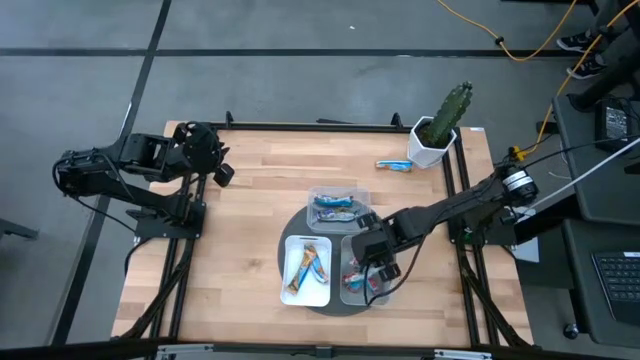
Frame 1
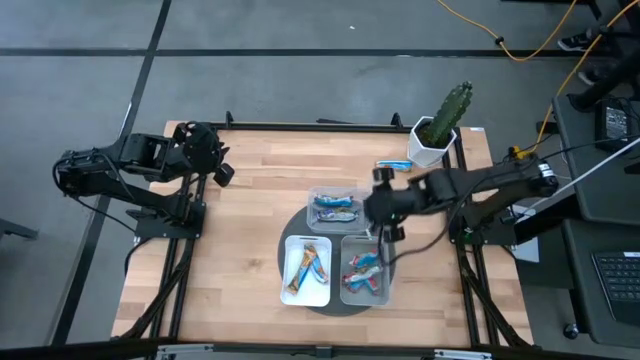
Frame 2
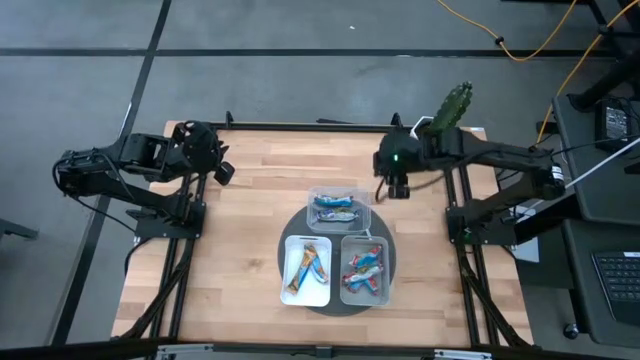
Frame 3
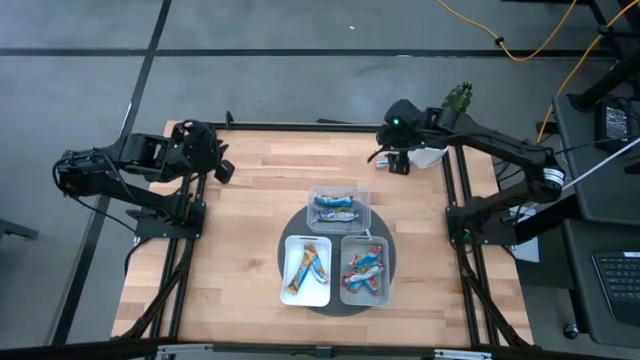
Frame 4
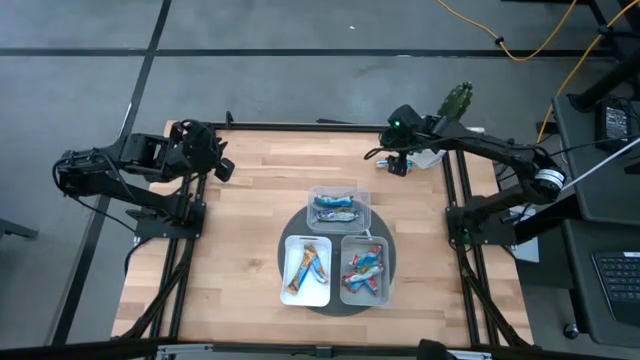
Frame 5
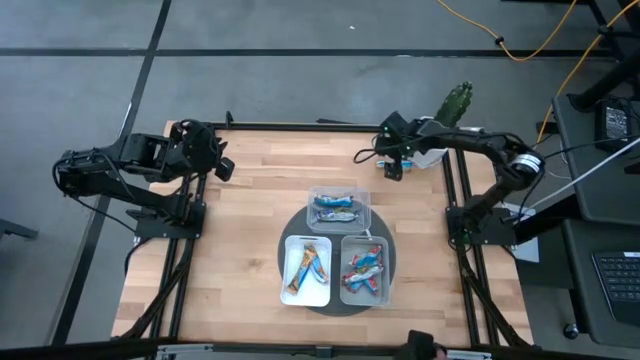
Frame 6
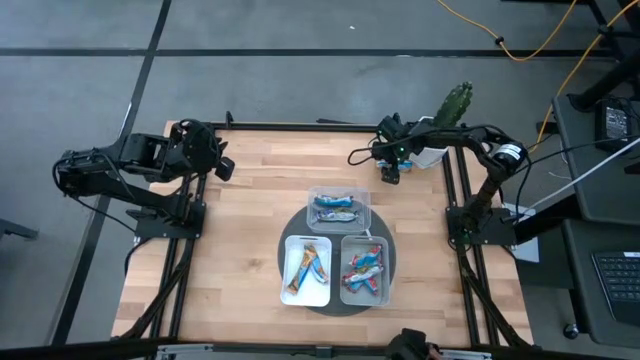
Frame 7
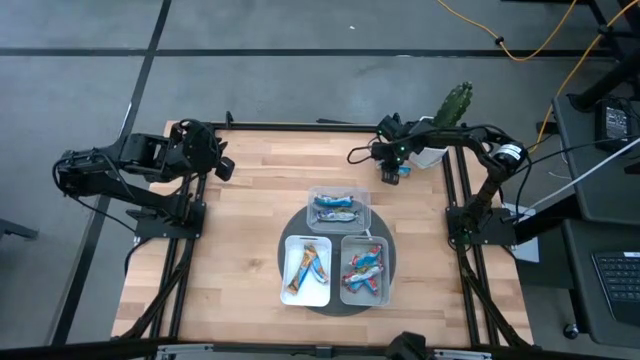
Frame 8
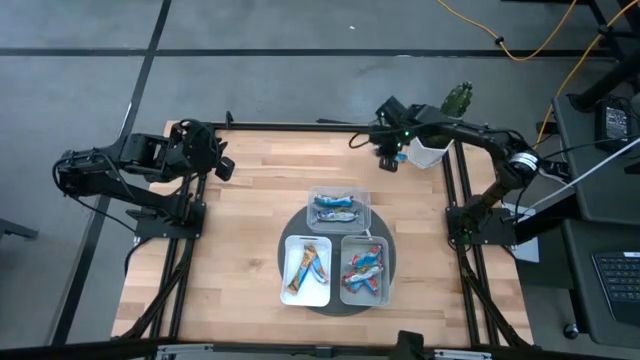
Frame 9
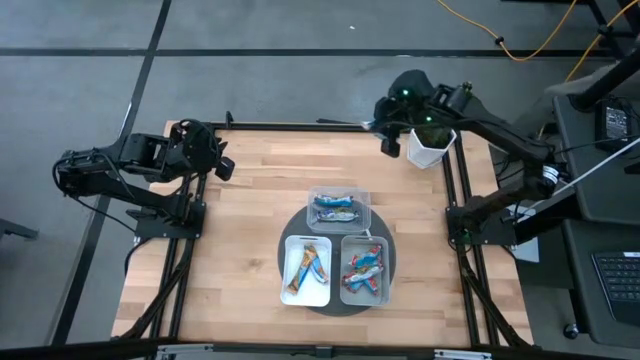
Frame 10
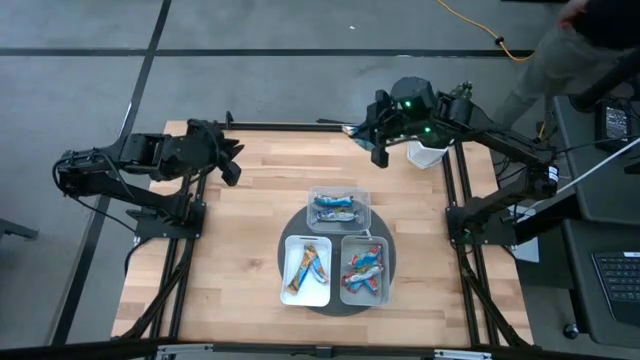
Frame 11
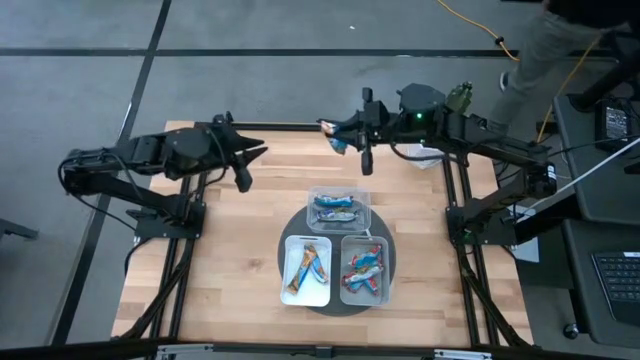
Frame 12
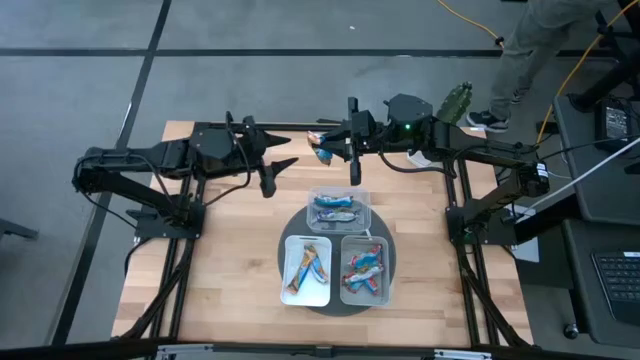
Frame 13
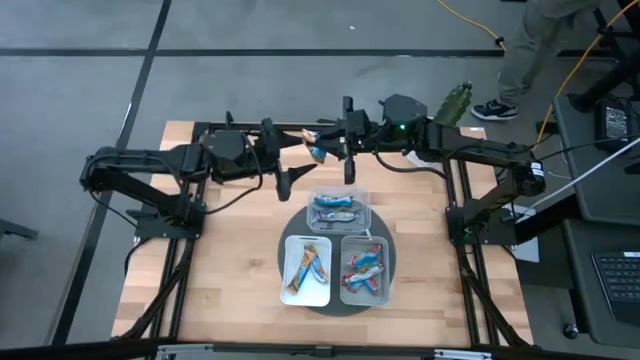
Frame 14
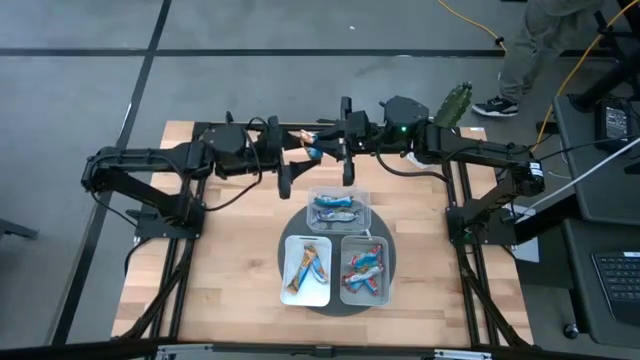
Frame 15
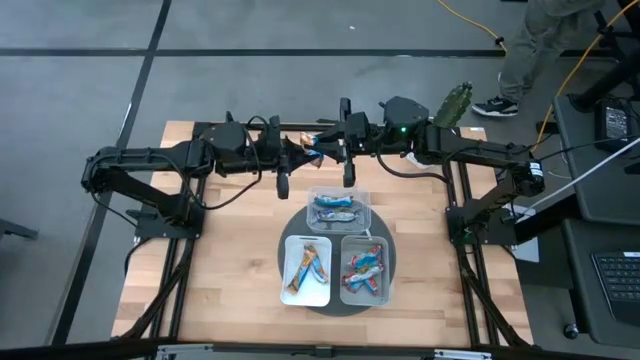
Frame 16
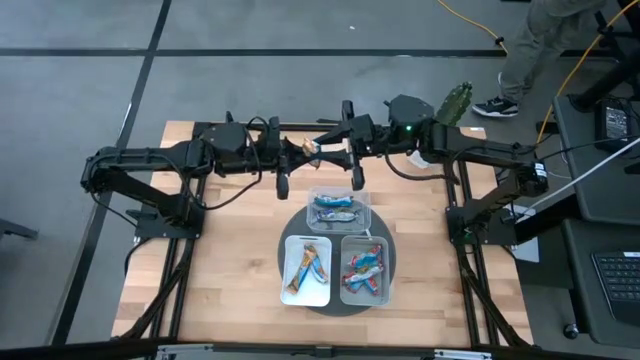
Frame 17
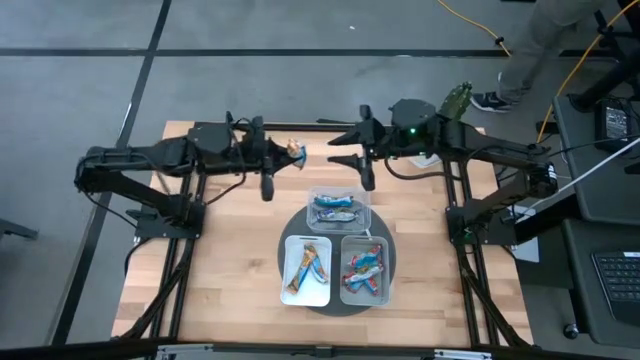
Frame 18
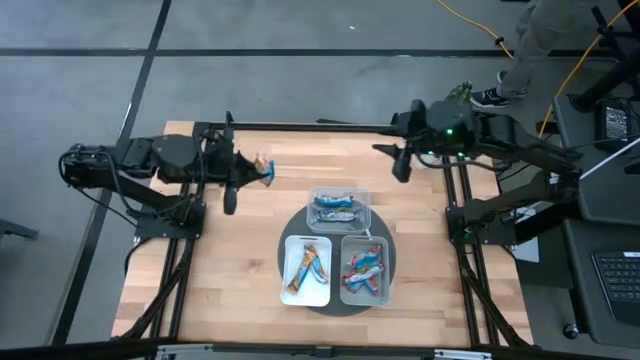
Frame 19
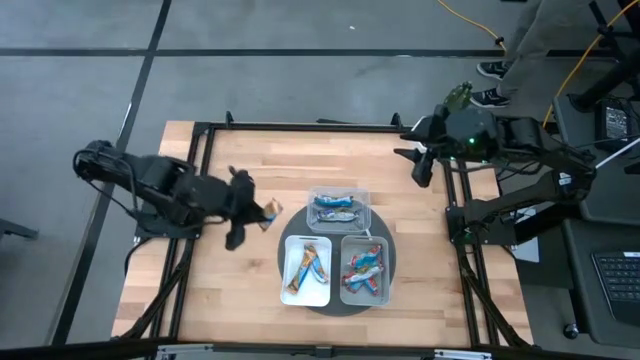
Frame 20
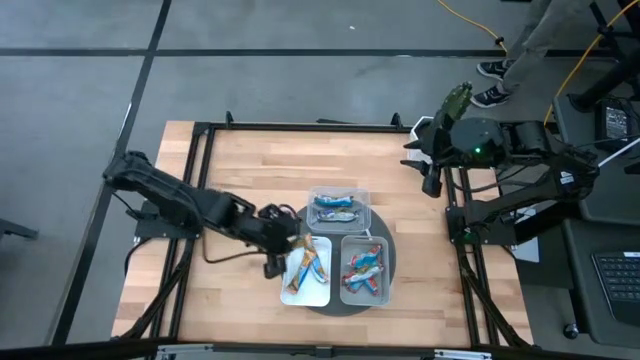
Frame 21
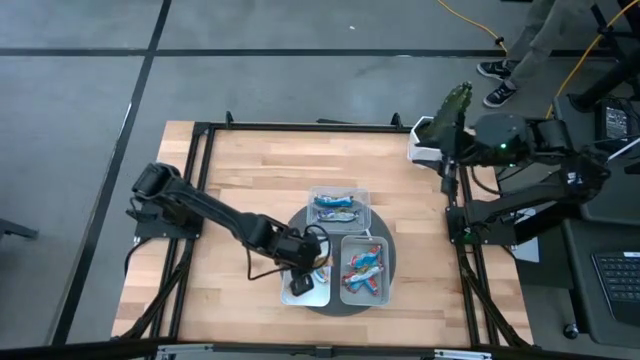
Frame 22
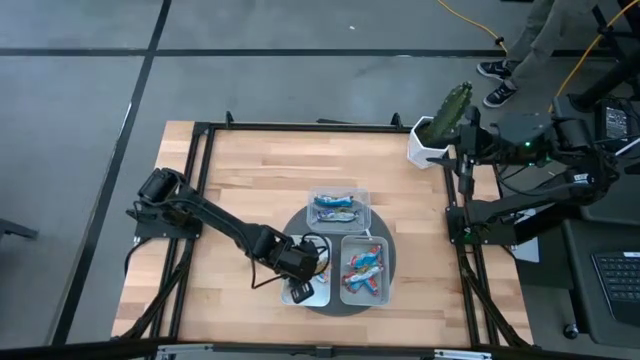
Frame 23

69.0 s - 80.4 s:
Task: Pick and place Granola Bars by type
Put the orange chocolate chip into the white bin

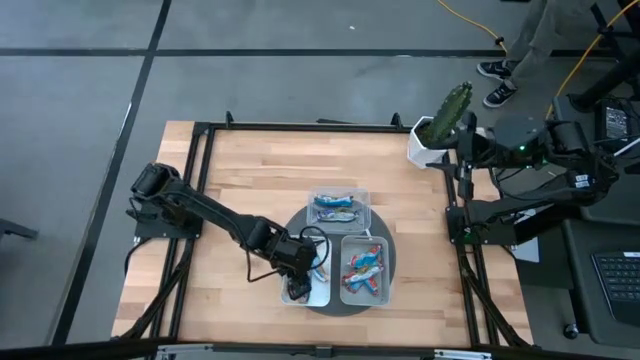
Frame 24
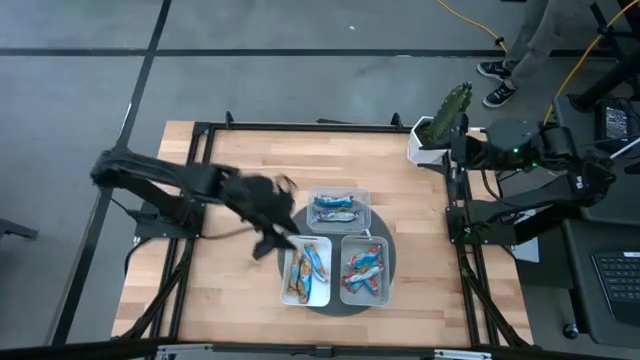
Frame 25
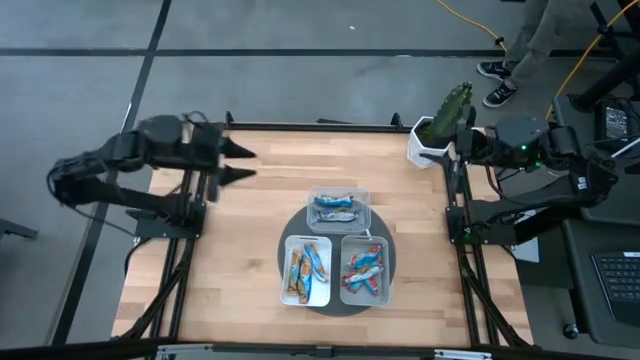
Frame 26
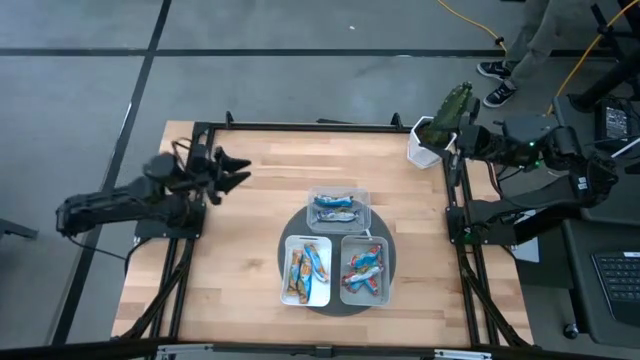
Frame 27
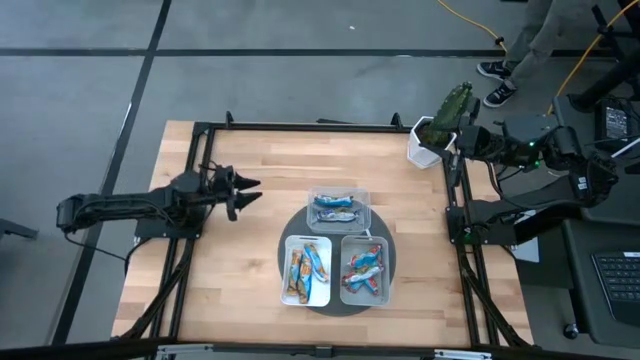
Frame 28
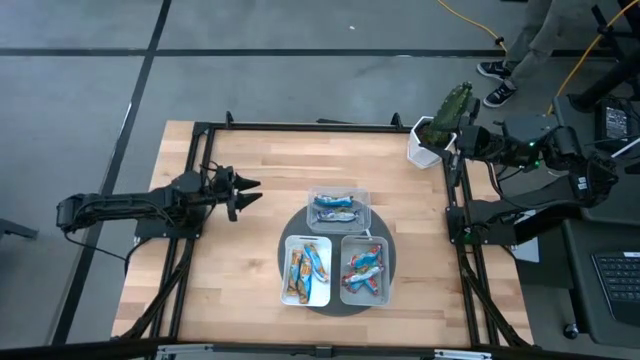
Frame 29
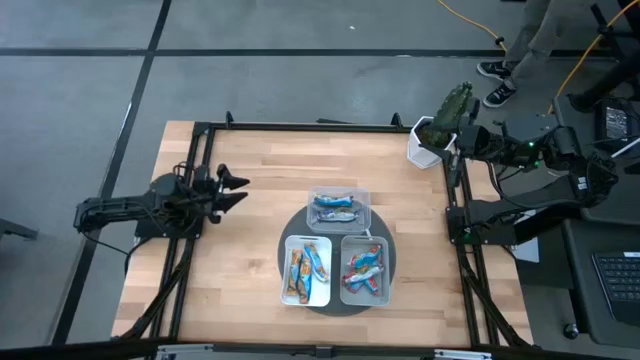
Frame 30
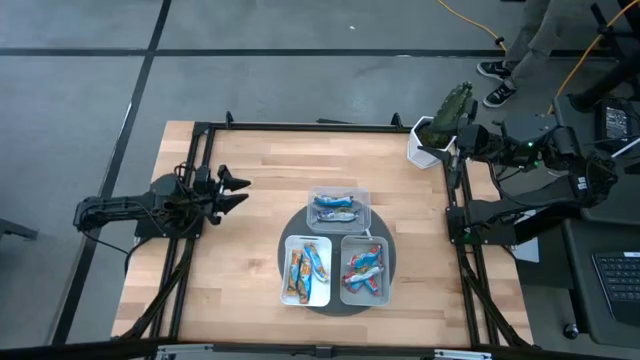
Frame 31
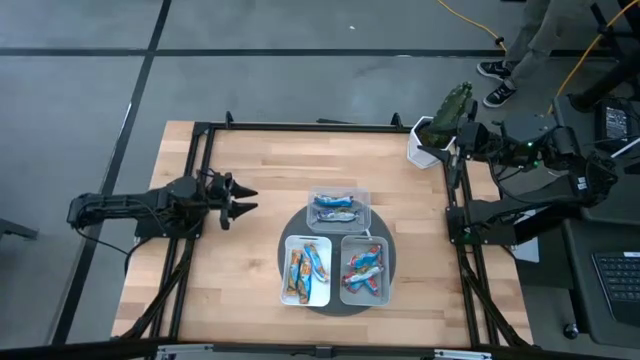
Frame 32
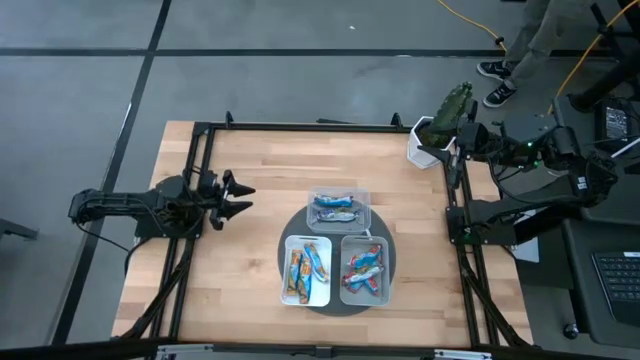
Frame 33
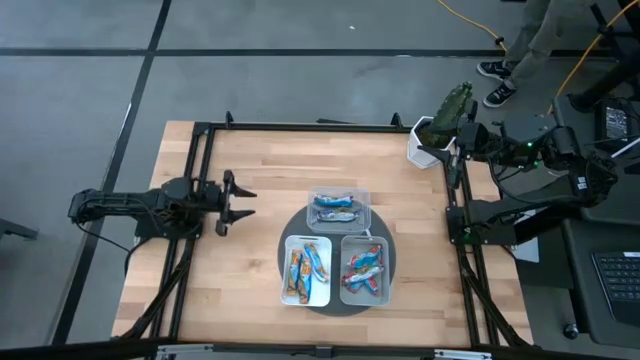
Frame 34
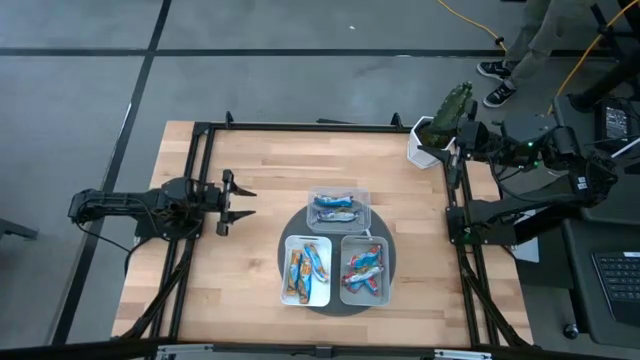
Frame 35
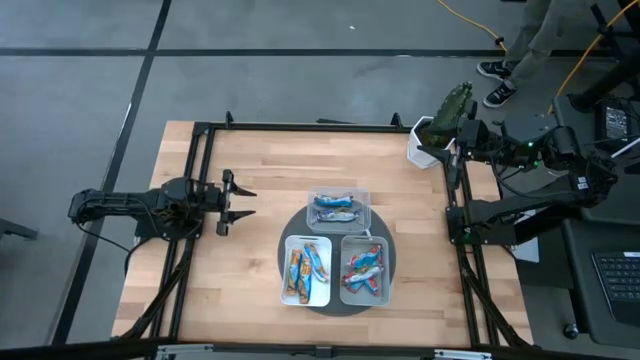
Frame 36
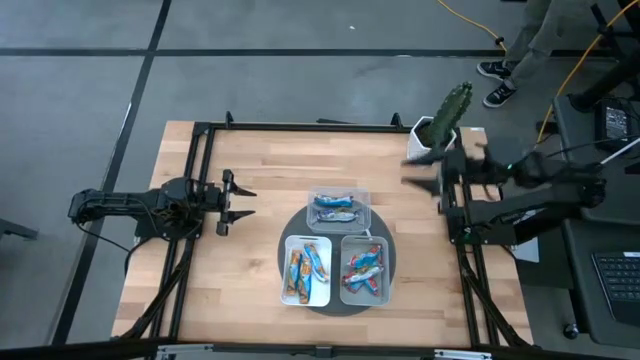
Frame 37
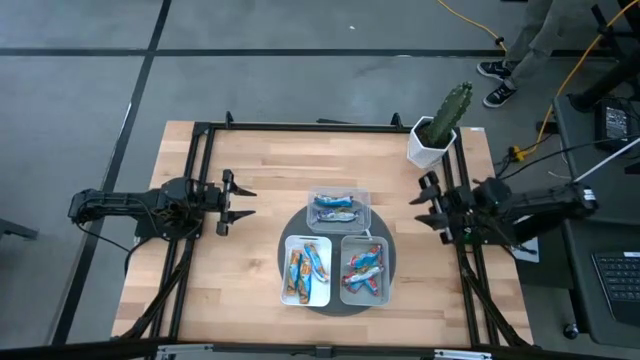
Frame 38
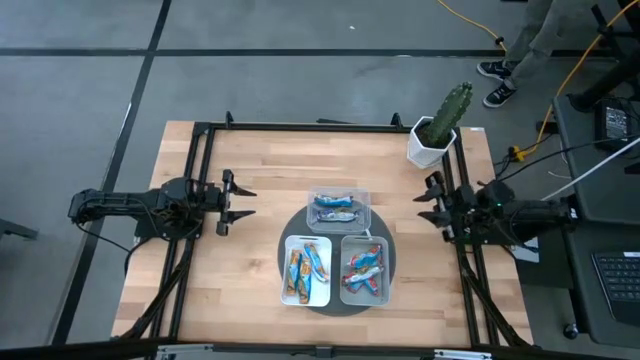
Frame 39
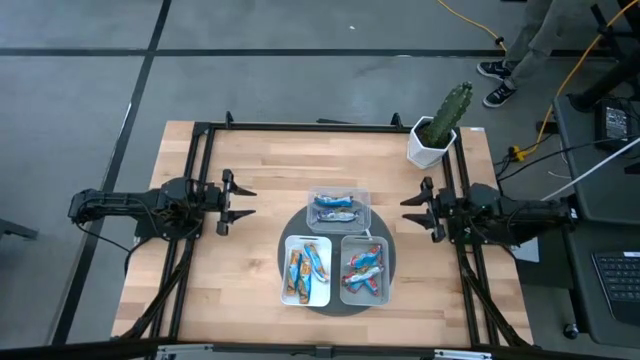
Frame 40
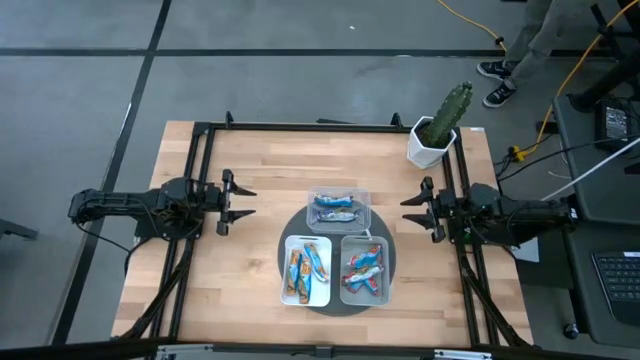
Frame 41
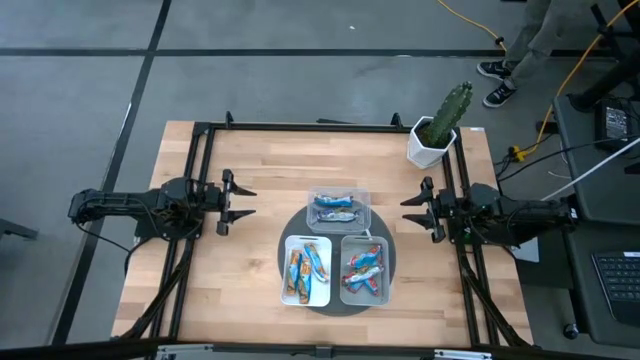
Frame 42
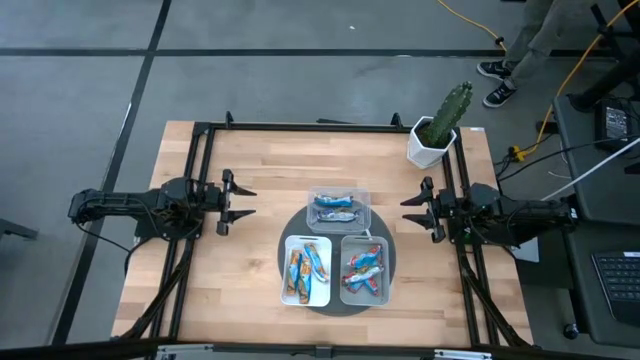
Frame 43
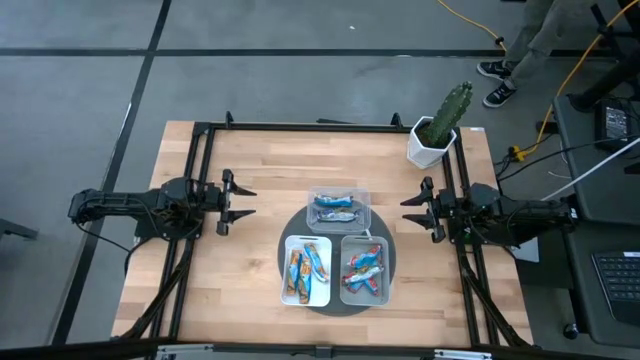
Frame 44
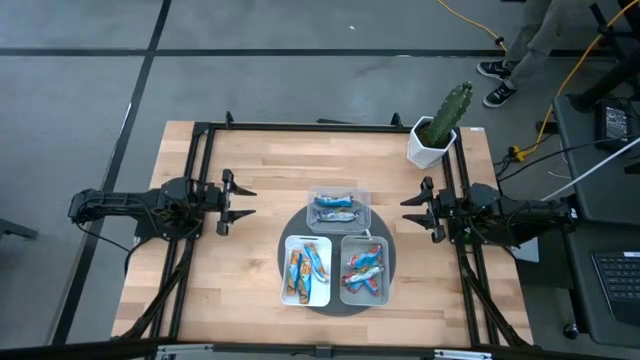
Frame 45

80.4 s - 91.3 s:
Return to Home Position
